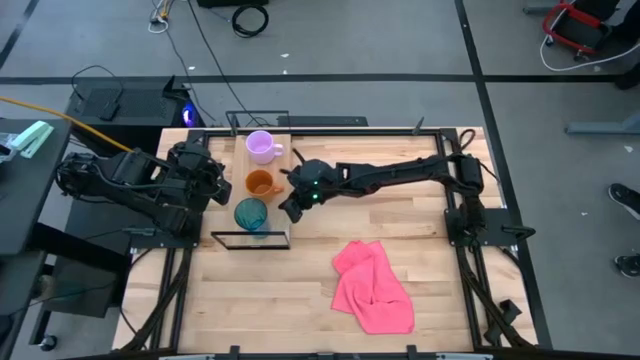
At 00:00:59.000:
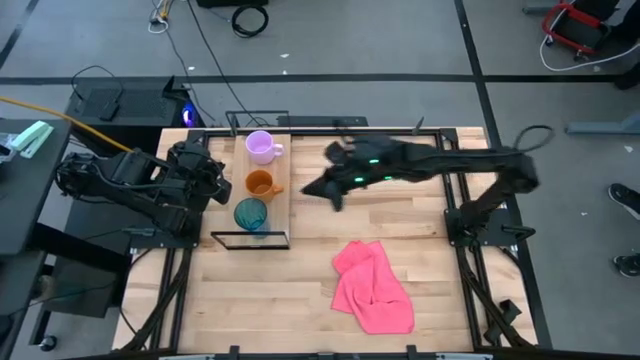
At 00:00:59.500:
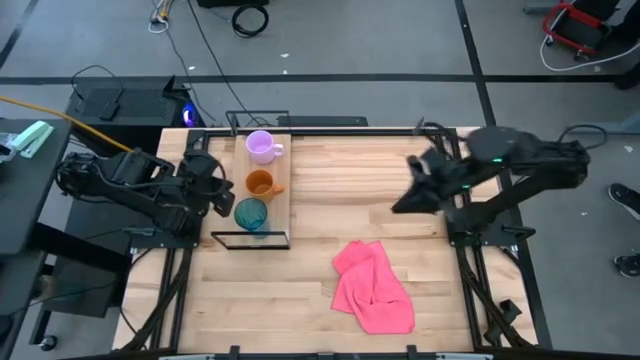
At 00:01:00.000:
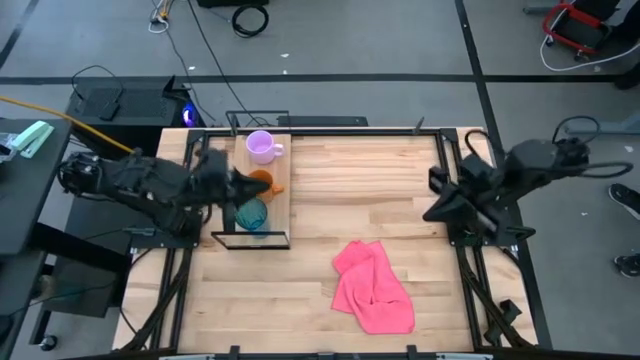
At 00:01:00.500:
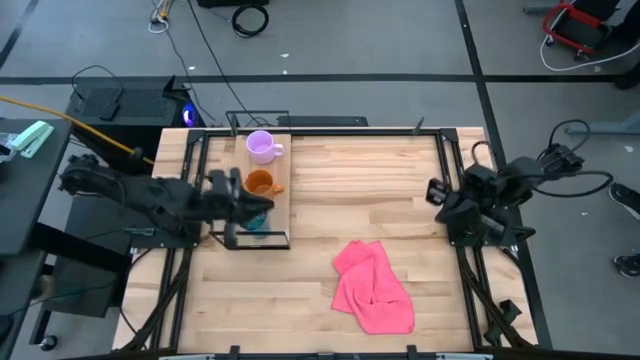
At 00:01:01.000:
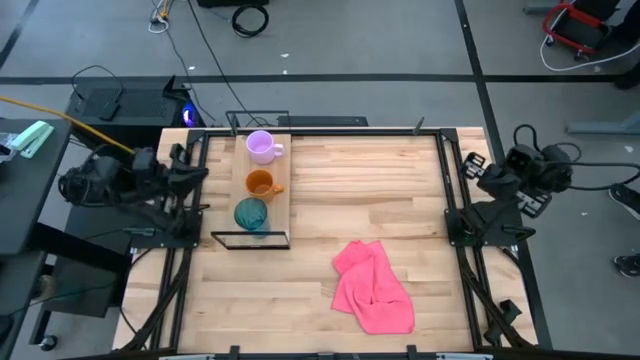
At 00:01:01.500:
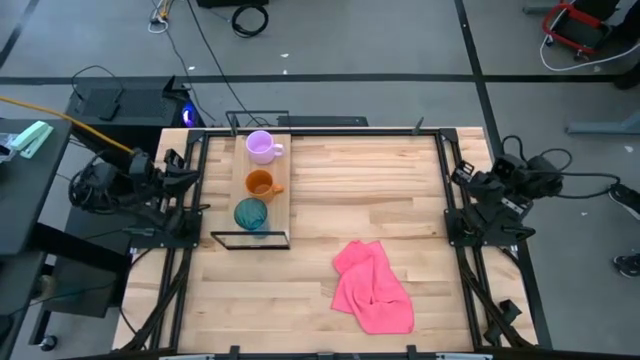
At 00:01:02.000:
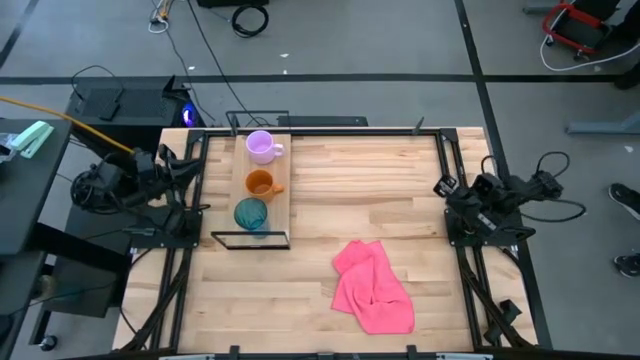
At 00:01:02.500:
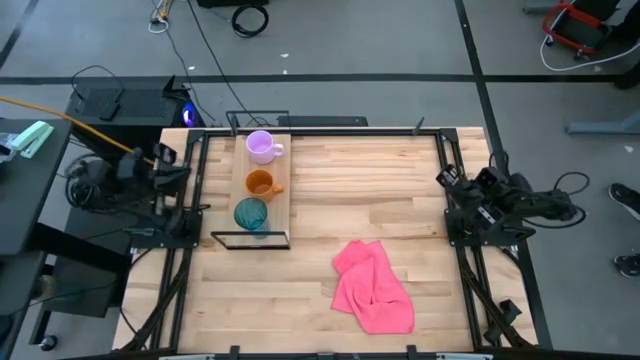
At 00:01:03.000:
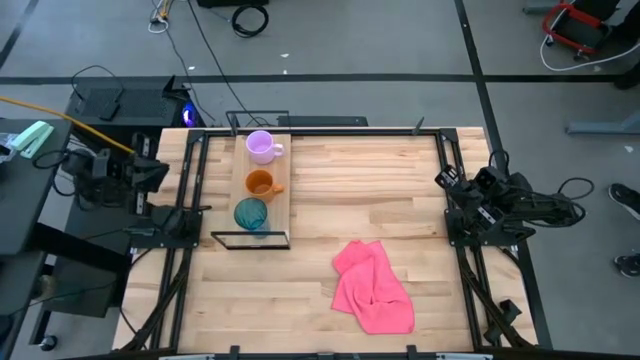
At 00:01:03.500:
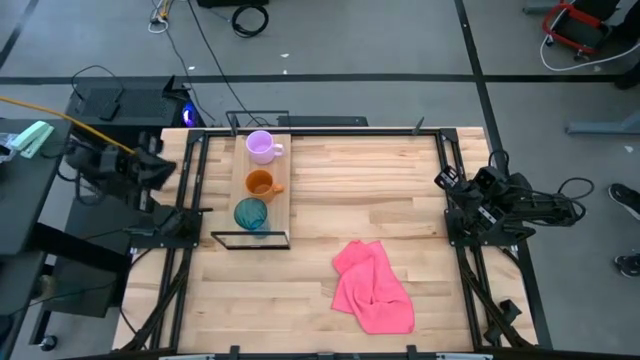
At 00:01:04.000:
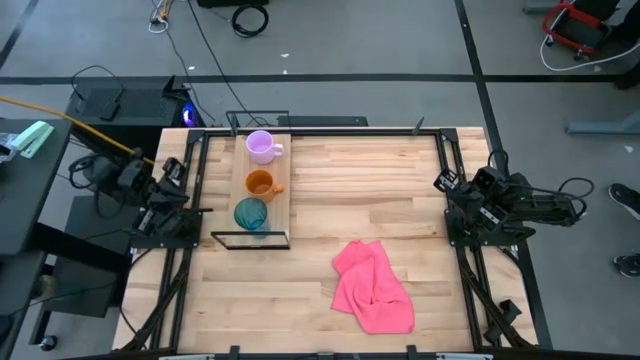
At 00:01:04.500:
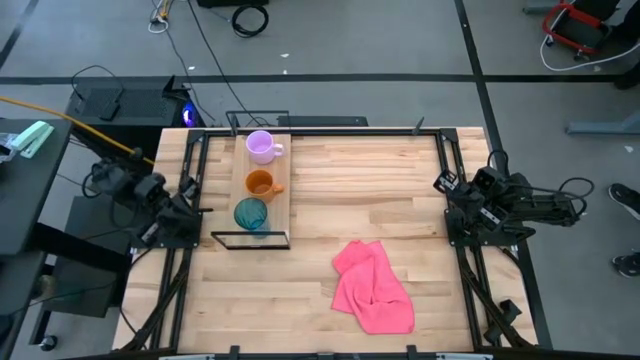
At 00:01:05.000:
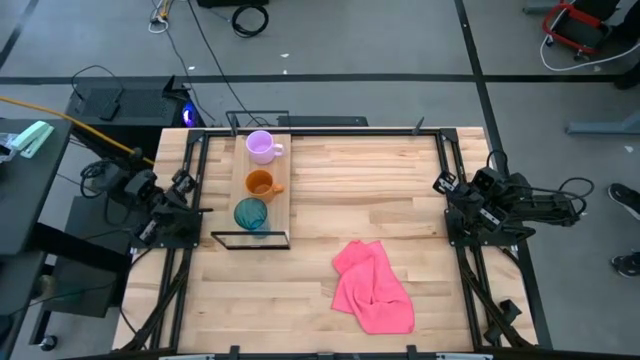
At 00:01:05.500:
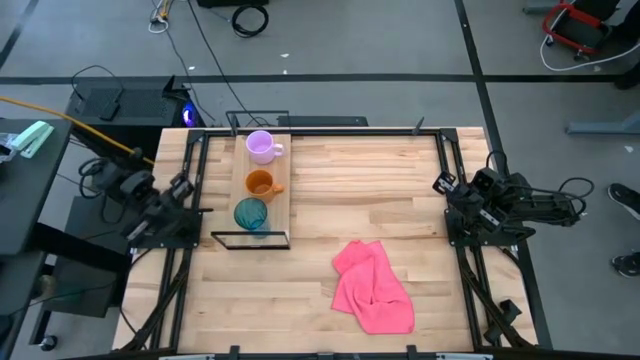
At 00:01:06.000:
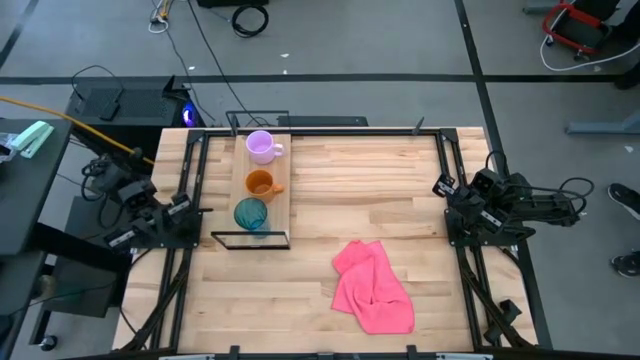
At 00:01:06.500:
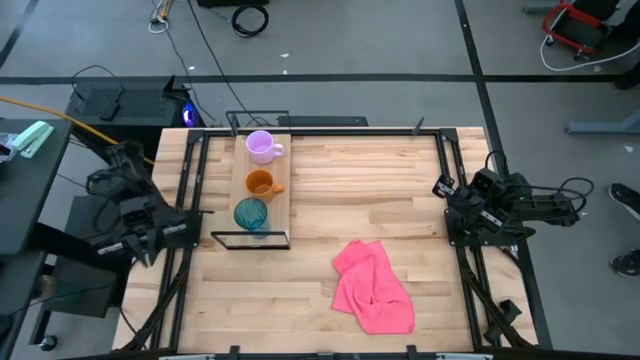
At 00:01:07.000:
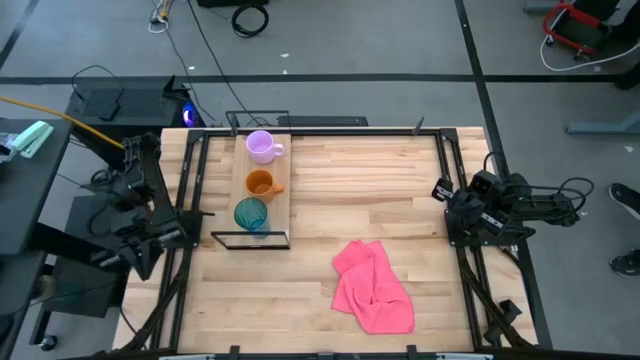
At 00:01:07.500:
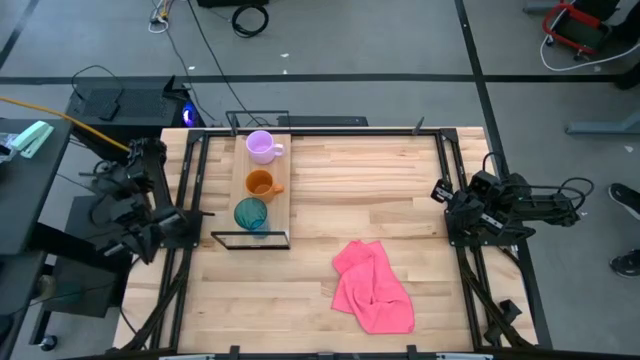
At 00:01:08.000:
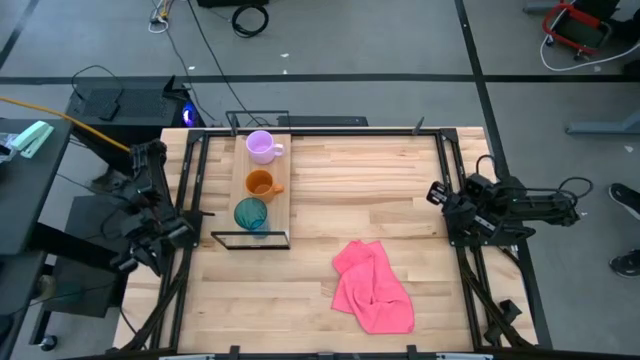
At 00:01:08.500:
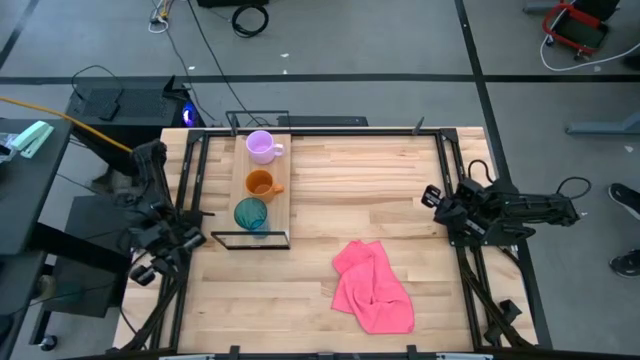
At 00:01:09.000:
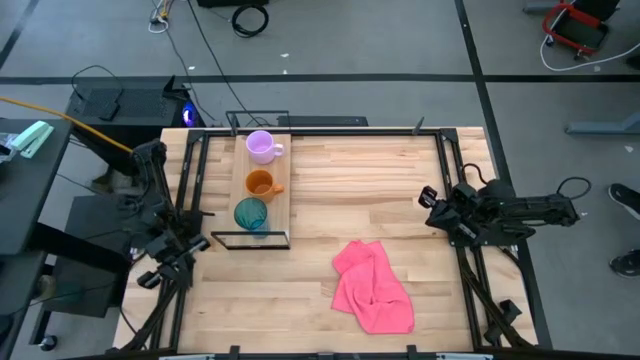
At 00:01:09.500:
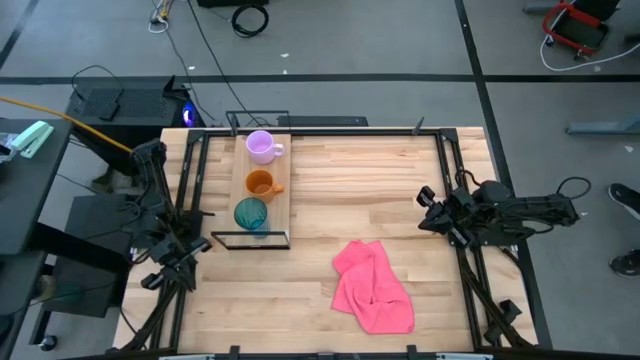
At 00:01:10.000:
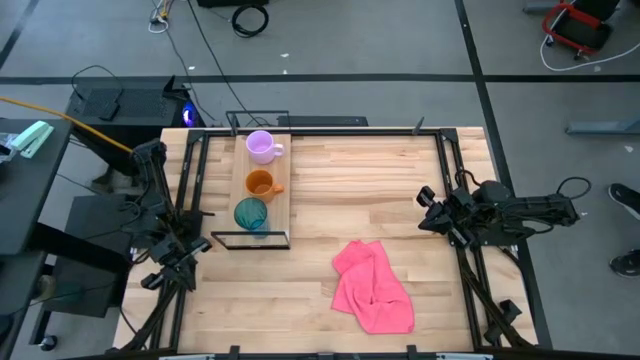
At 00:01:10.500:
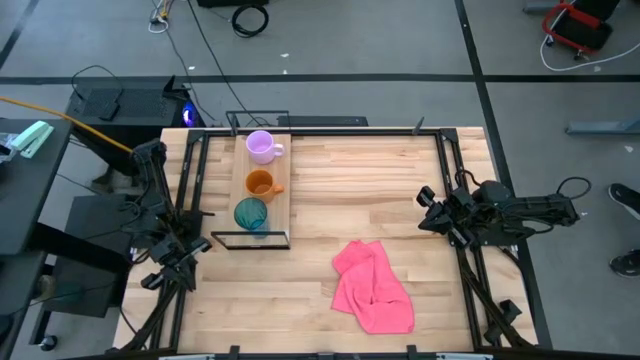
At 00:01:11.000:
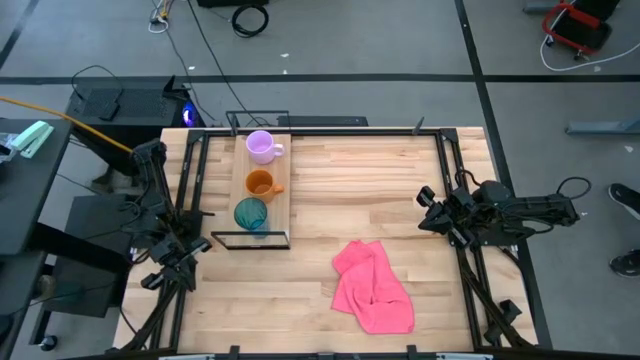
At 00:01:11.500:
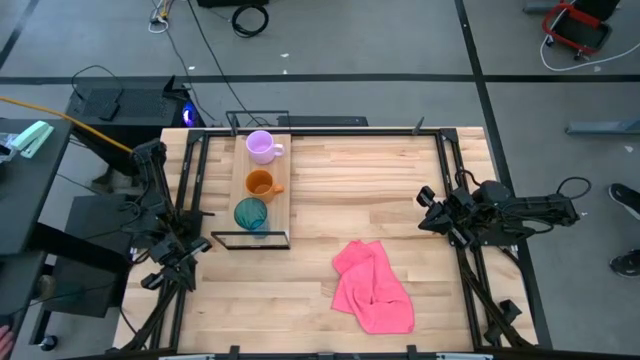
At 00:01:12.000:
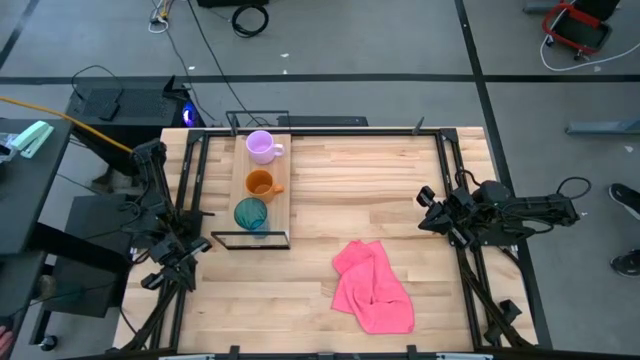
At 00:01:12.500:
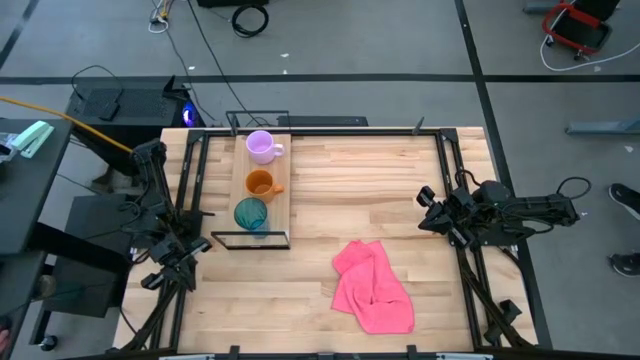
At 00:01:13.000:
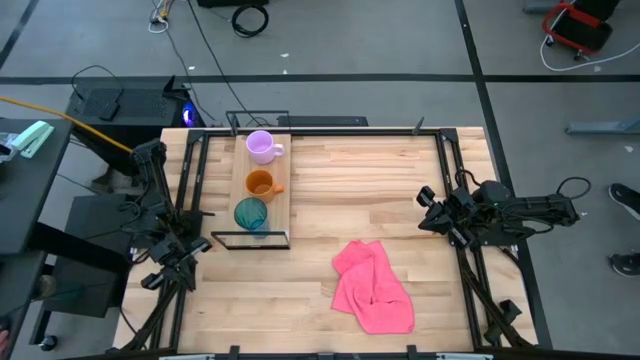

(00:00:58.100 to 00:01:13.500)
Task: Stack small to large cups/mugs on shelf
Return to Home Position

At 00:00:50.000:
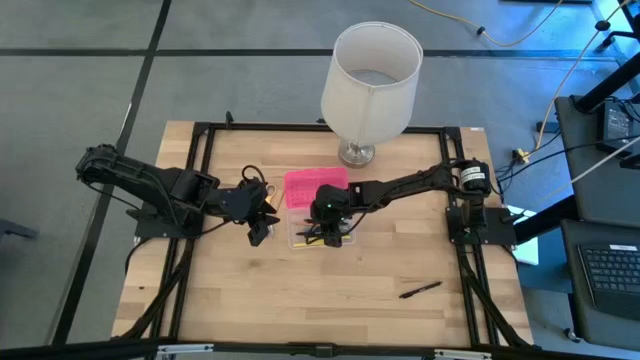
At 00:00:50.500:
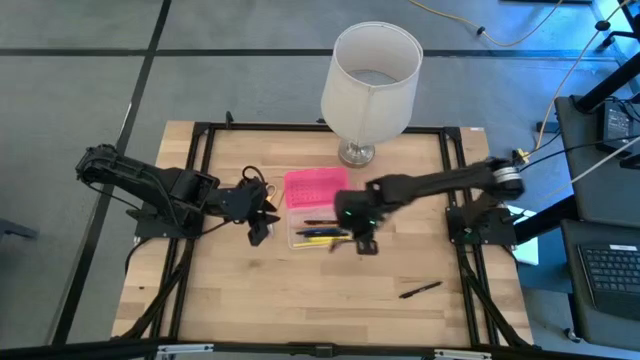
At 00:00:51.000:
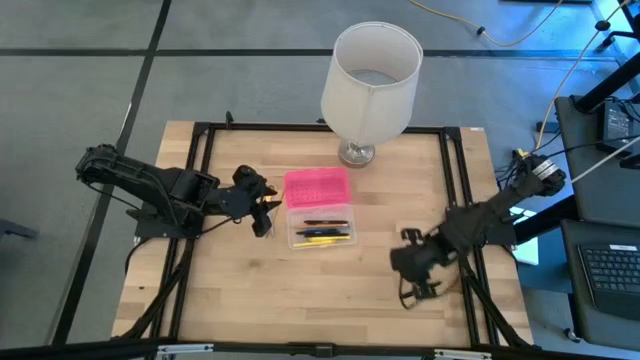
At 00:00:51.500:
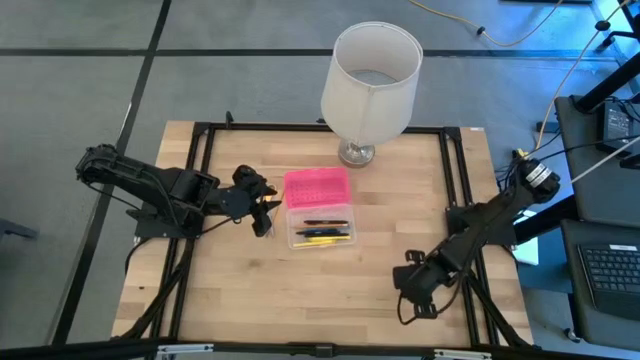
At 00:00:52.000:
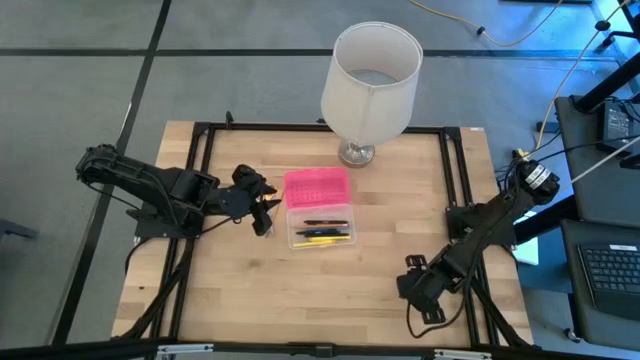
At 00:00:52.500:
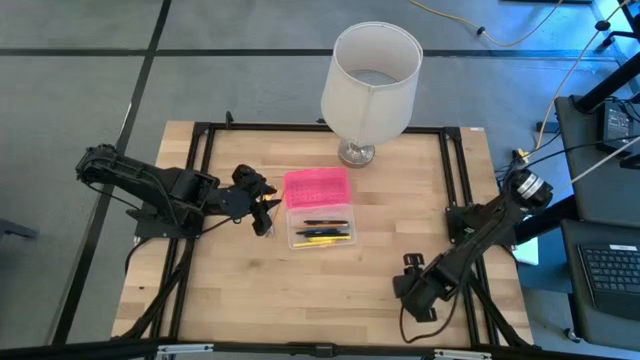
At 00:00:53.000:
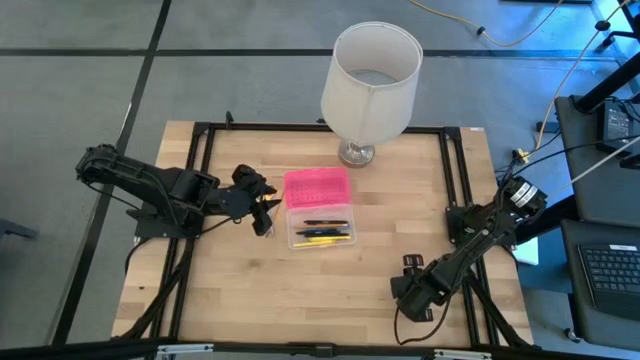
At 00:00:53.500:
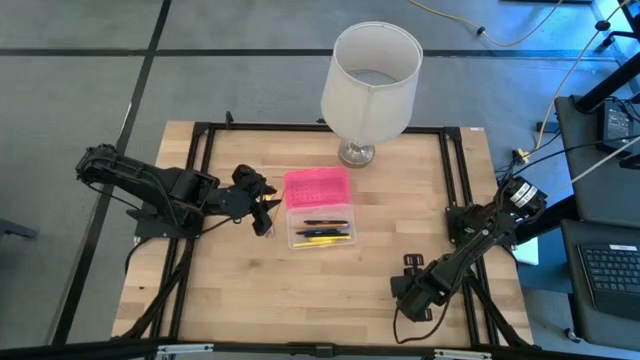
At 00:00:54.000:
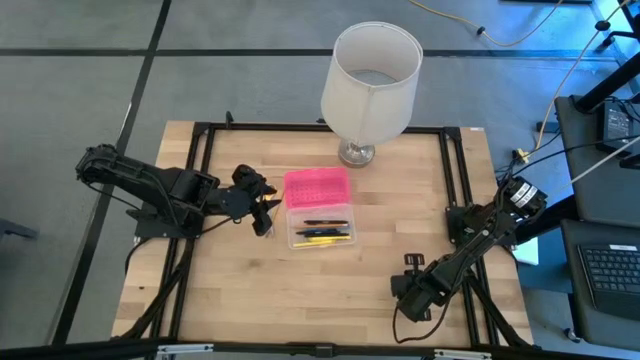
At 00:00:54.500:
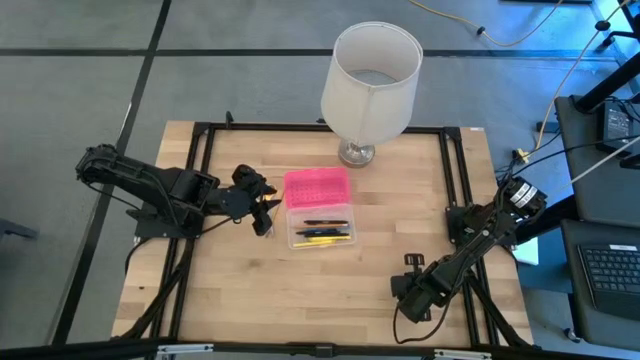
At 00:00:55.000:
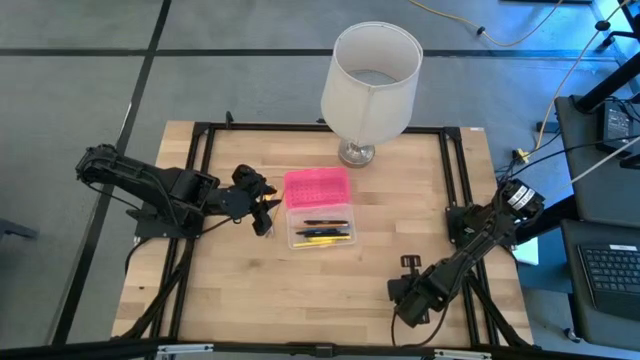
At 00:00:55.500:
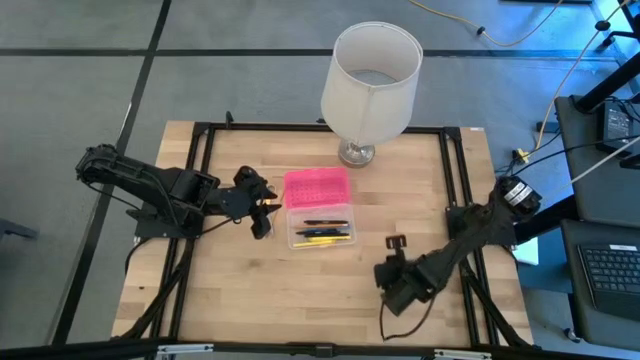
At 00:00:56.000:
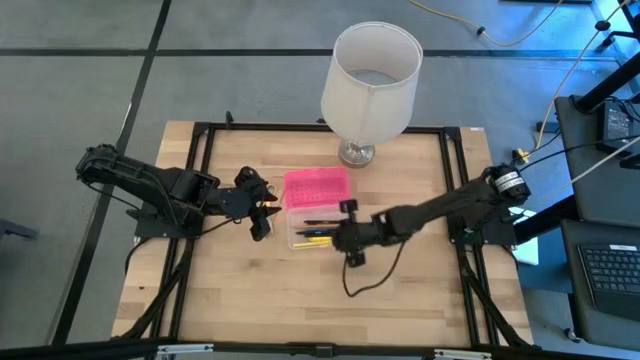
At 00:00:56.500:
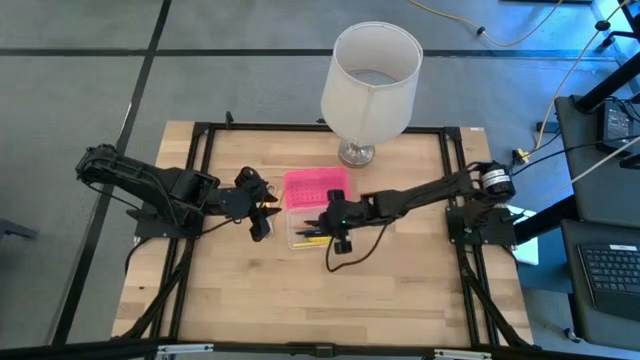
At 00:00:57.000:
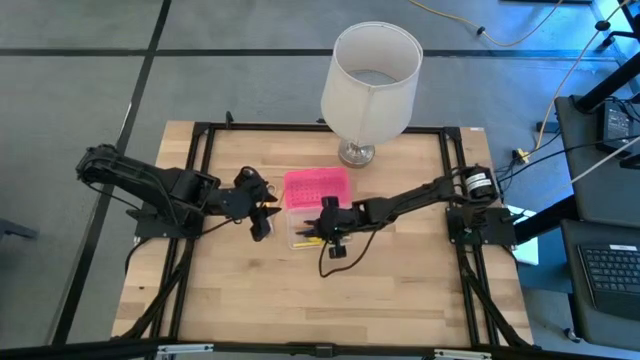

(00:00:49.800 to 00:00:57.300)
Task: Pick & place school supplies into a supply box
Put the black pen into the supply box
